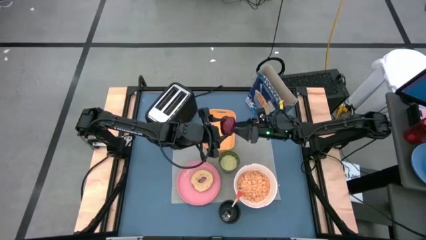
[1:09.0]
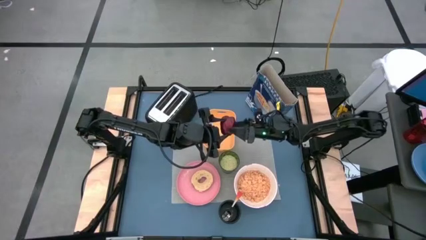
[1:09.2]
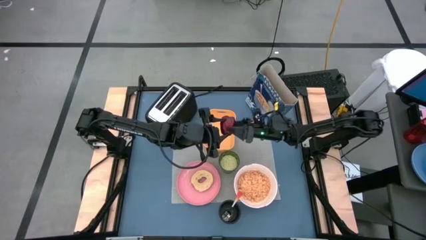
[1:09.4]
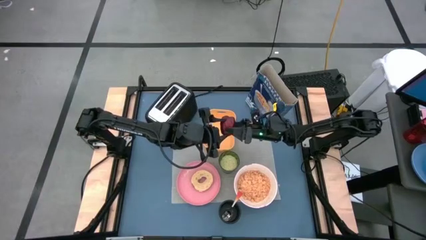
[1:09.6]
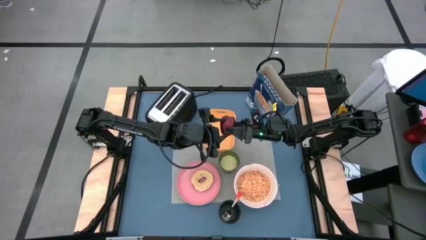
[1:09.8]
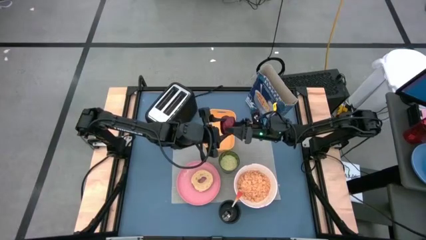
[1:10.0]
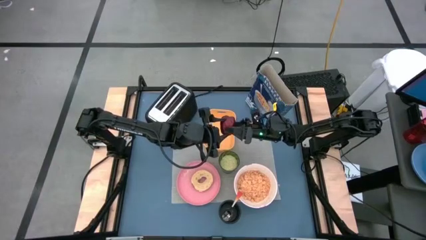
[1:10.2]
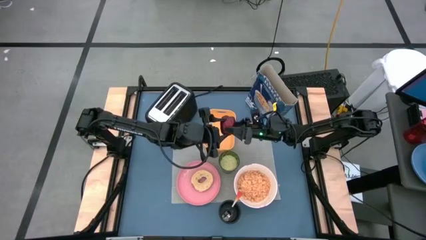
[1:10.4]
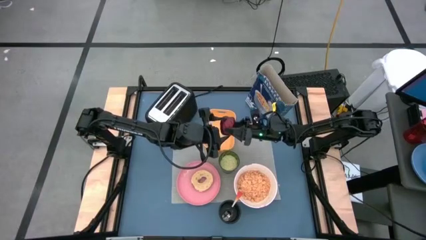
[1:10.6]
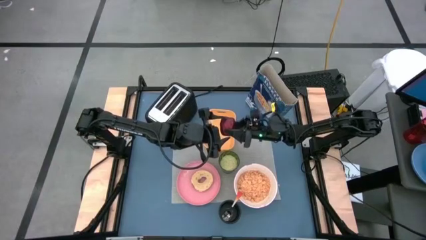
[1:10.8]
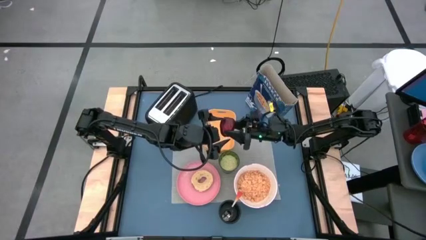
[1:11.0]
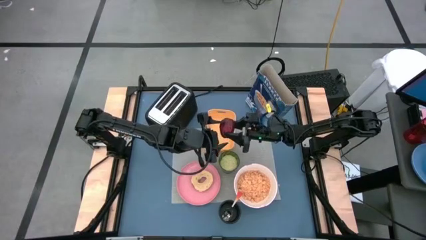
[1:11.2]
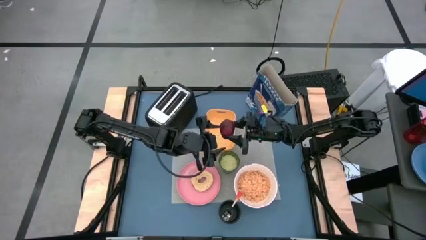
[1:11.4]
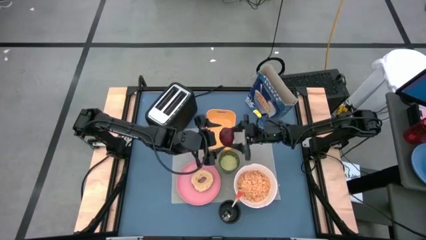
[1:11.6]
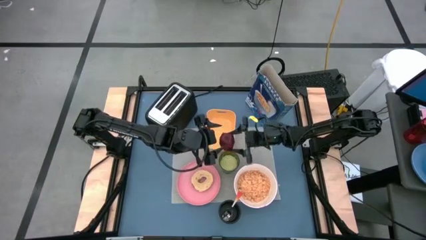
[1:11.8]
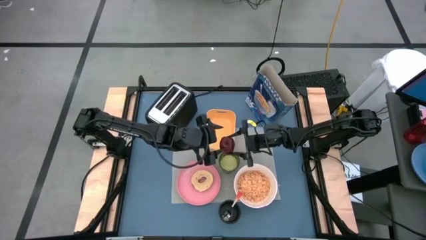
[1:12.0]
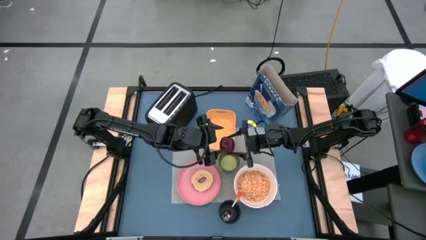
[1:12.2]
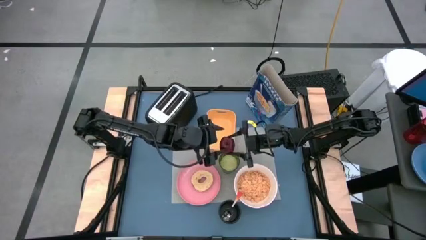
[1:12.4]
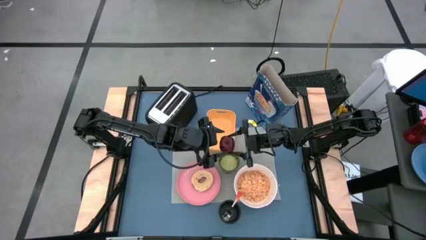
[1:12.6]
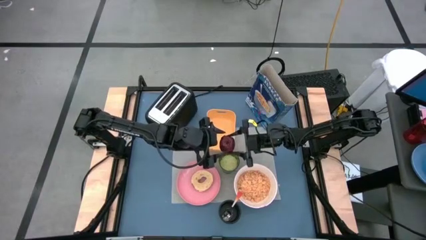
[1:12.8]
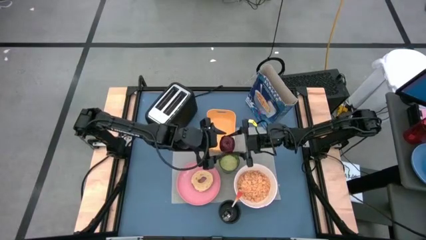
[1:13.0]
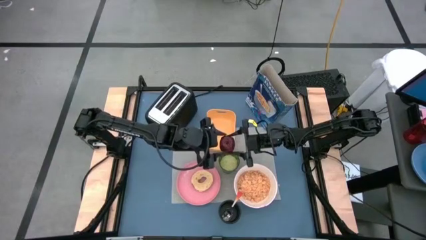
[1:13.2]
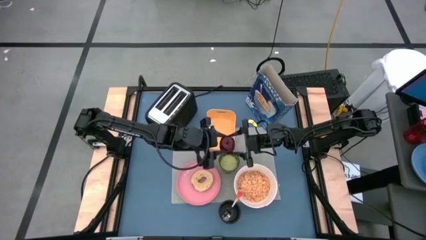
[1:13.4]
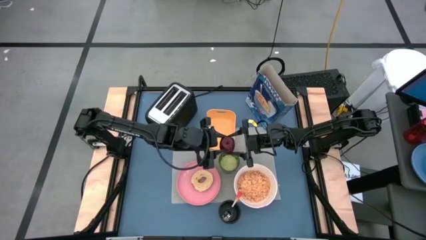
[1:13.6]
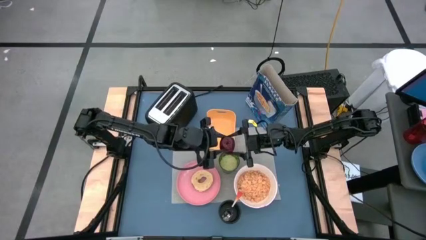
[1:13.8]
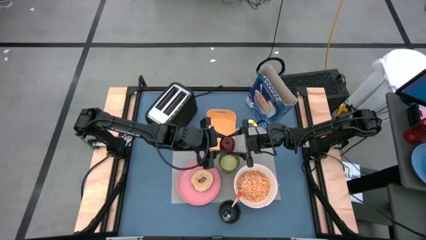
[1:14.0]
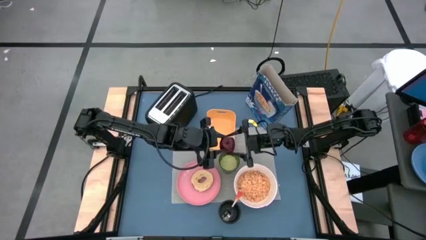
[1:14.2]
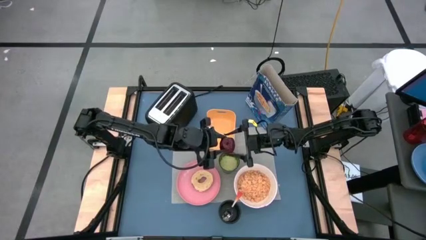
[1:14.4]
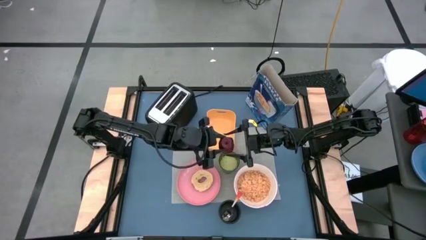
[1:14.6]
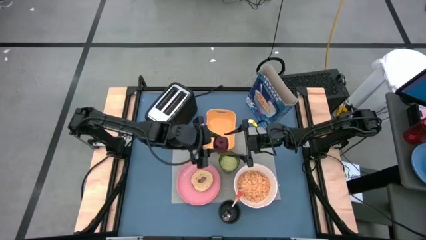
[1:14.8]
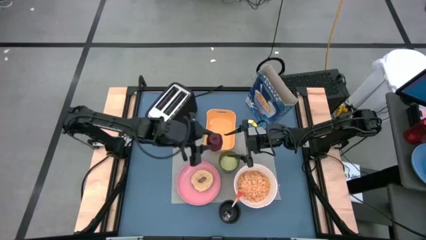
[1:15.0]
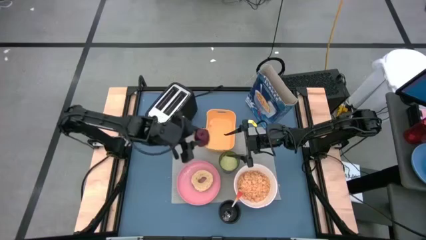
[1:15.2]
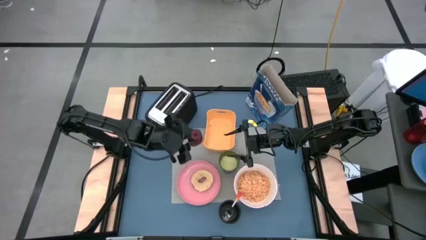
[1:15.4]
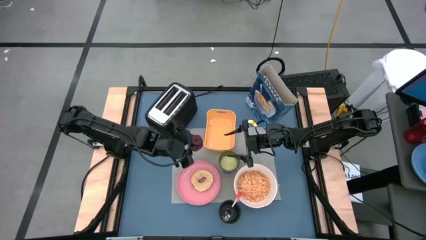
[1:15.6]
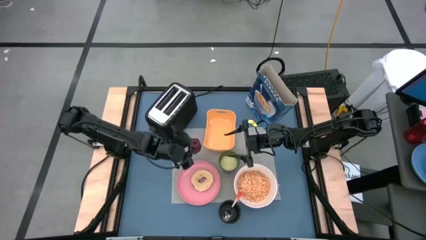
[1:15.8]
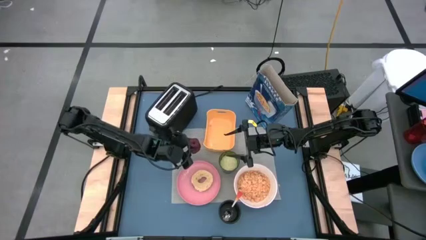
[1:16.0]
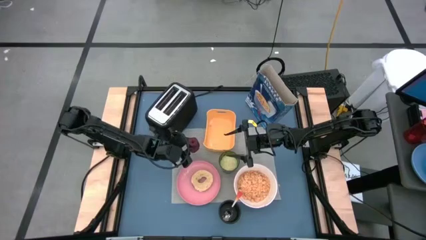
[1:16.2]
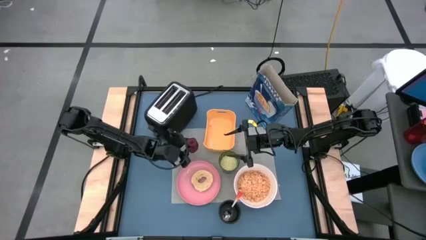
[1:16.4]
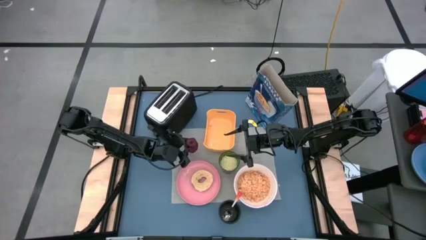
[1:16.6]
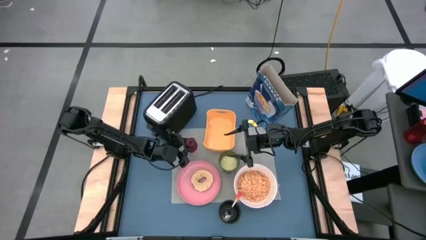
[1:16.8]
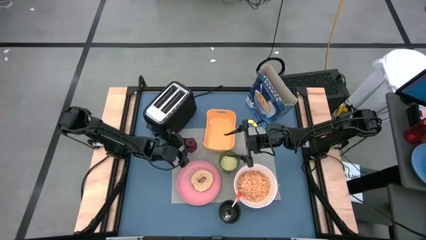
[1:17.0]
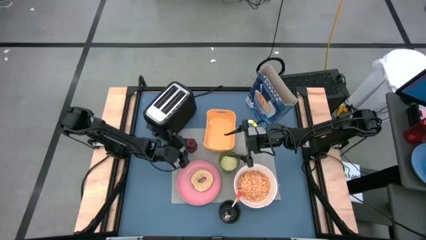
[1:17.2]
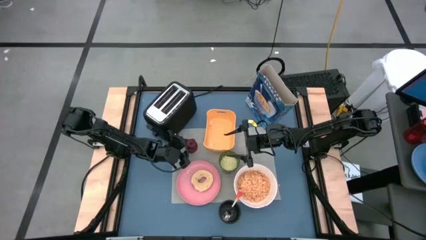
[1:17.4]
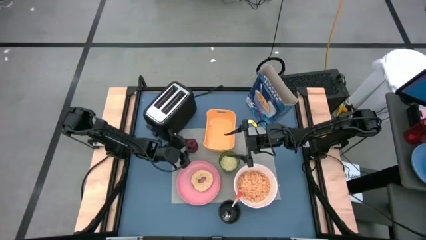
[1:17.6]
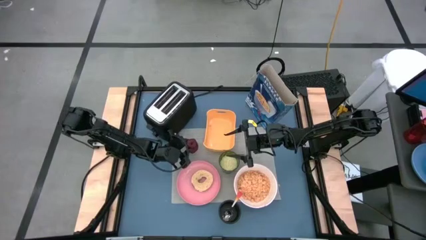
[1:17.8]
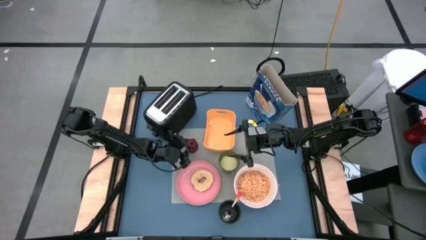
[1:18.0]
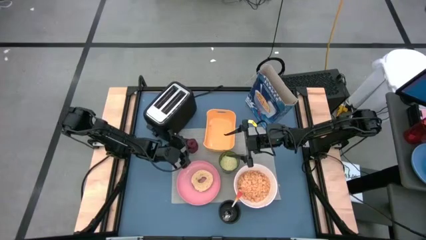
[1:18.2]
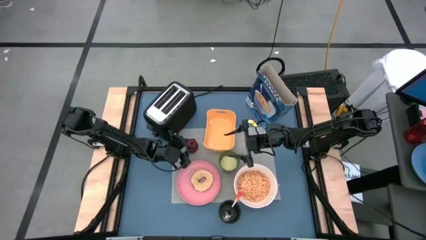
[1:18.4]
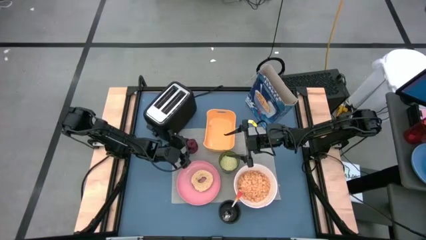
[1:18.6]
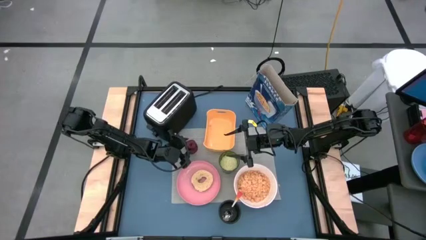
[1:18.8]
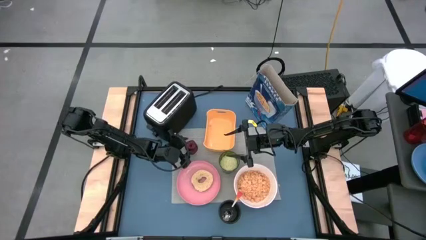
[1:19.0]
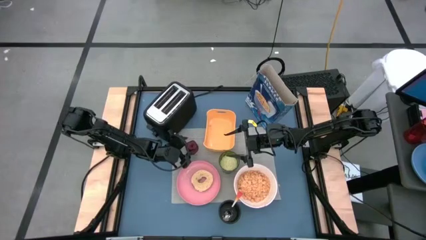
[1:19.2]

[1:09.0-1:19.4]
Task: Arrange a breakfast setting
Put the apple on the top of the pink plate
